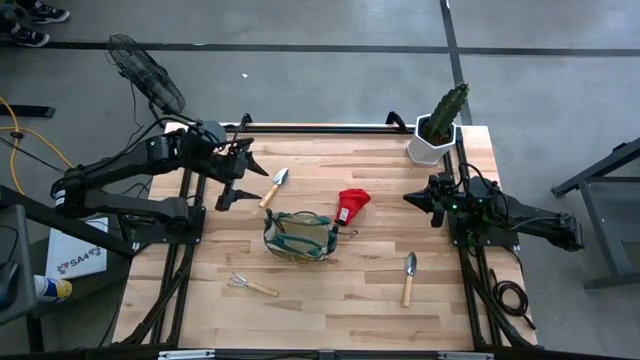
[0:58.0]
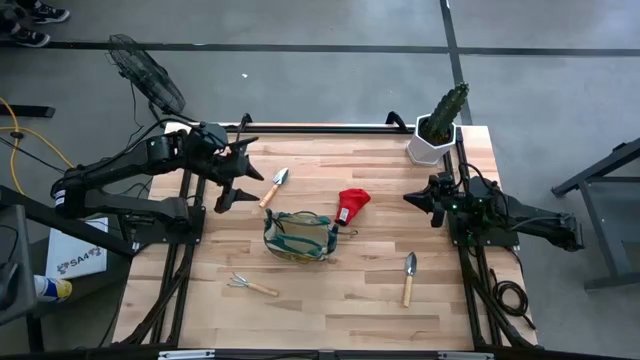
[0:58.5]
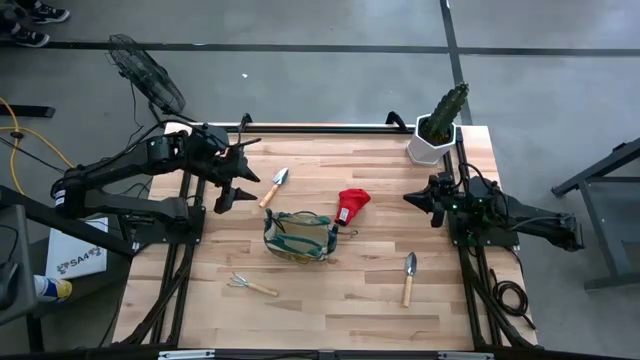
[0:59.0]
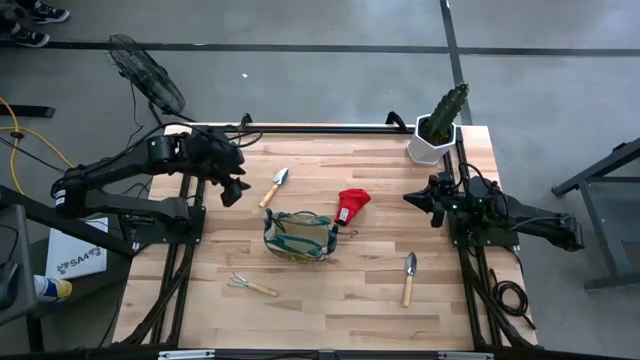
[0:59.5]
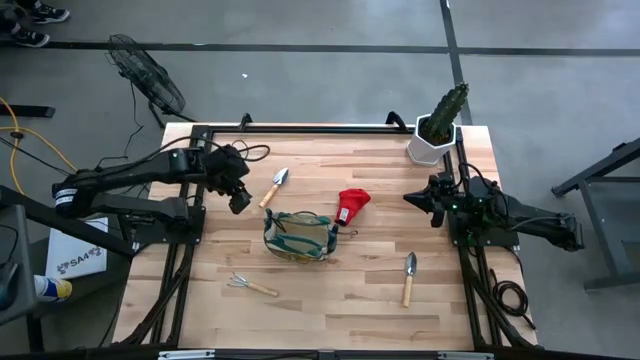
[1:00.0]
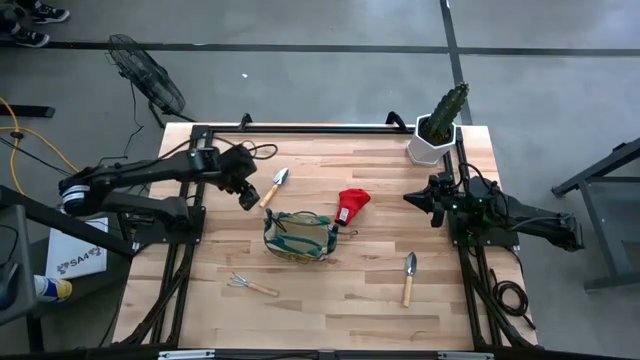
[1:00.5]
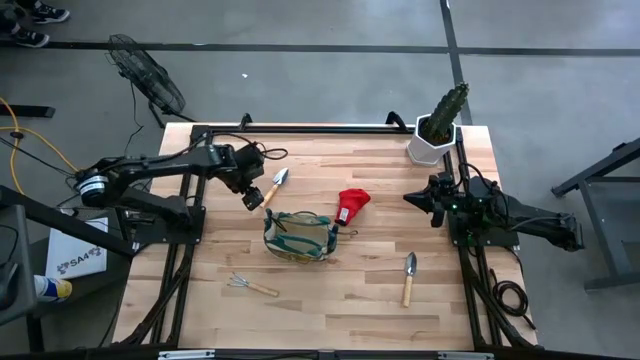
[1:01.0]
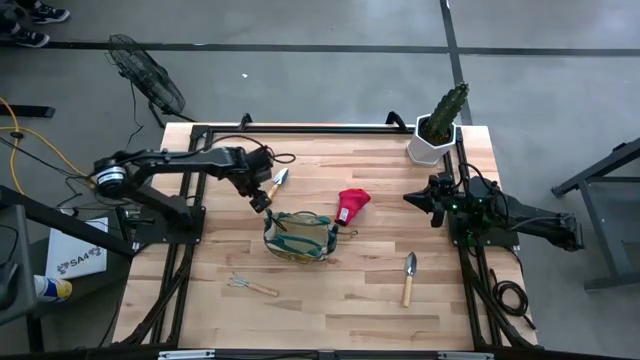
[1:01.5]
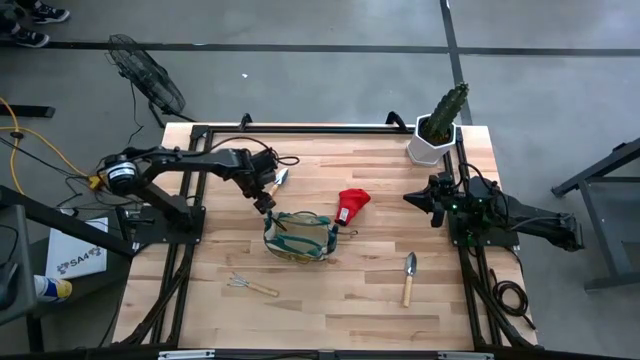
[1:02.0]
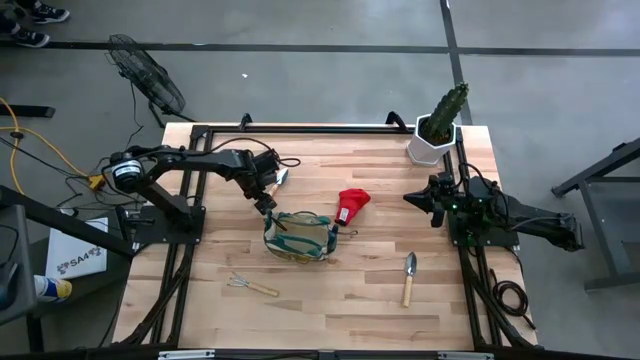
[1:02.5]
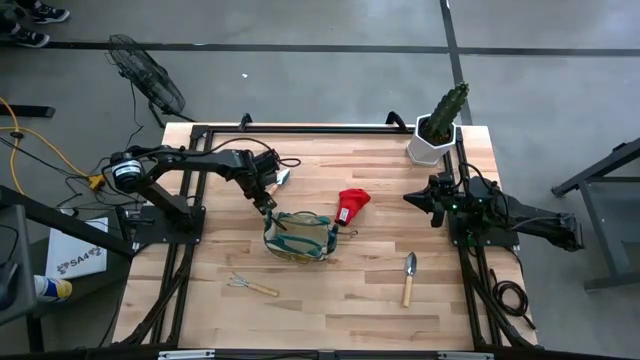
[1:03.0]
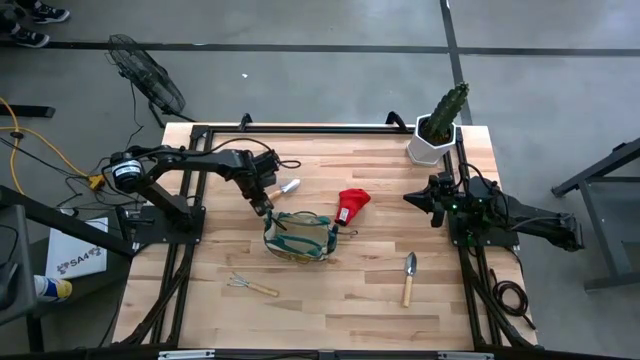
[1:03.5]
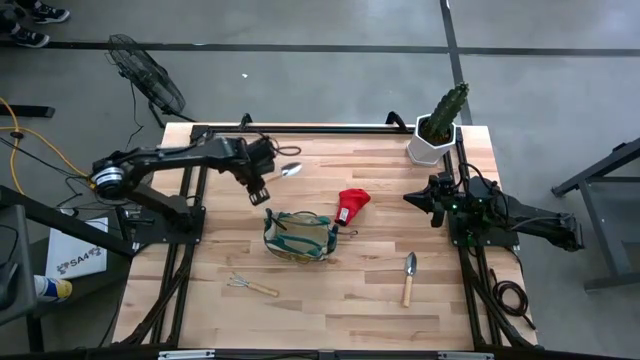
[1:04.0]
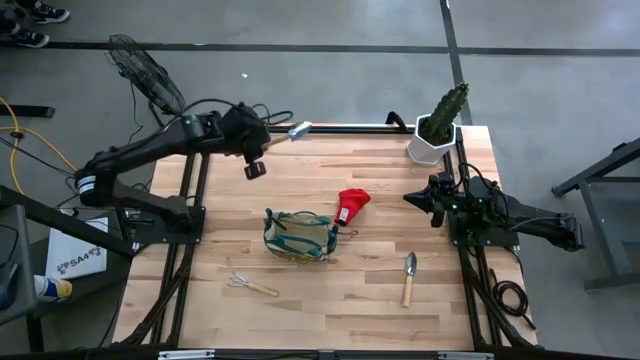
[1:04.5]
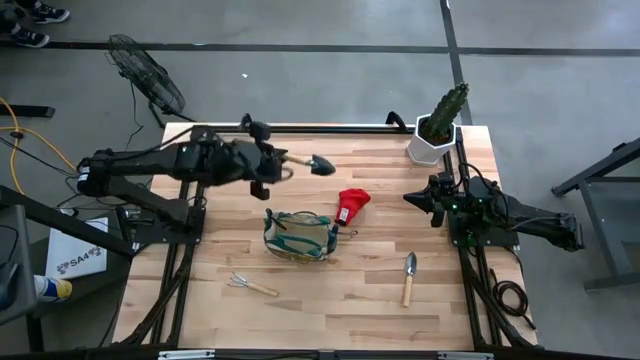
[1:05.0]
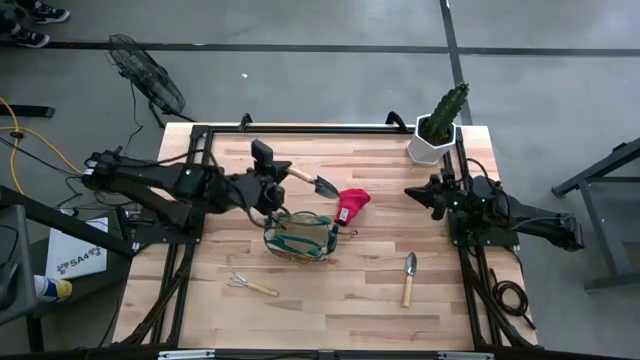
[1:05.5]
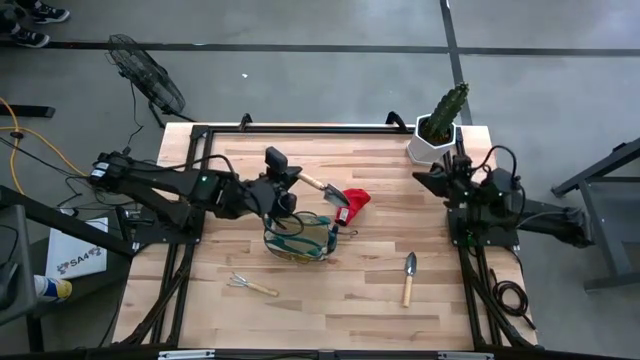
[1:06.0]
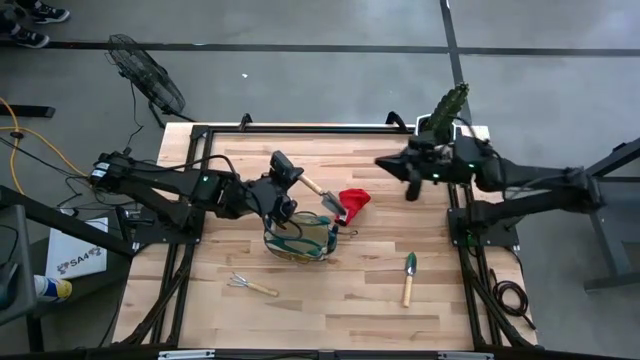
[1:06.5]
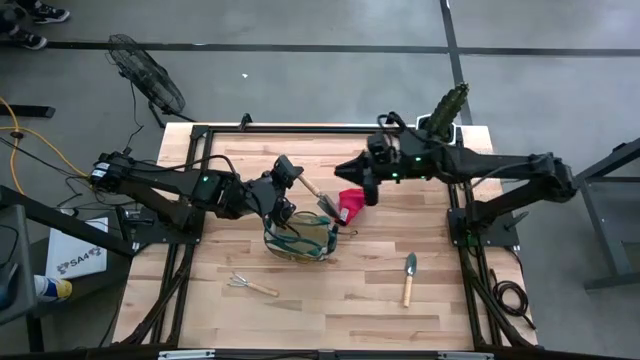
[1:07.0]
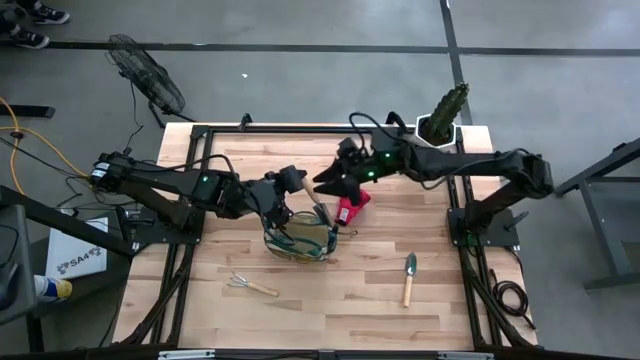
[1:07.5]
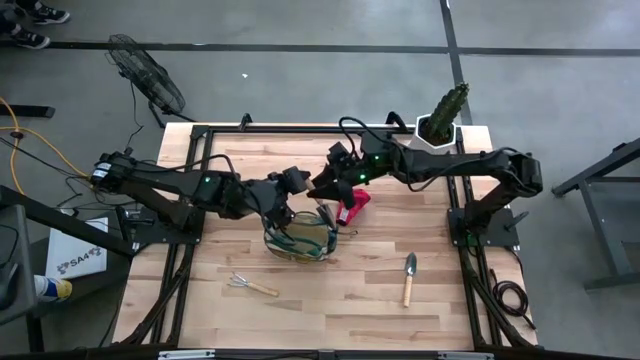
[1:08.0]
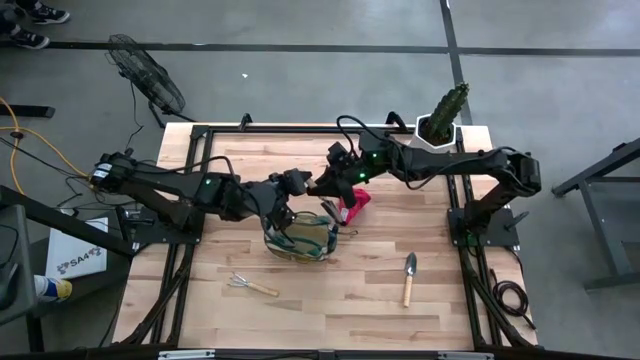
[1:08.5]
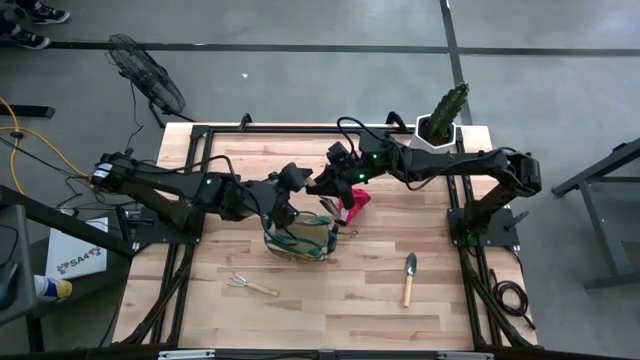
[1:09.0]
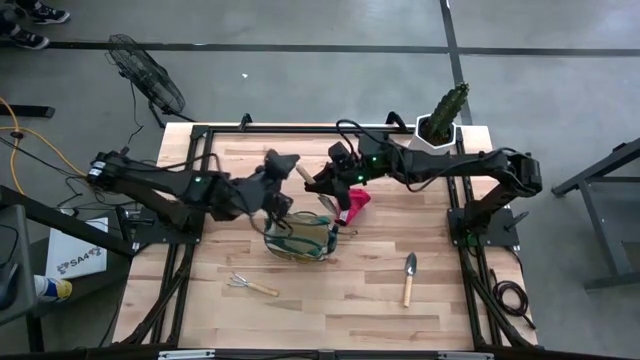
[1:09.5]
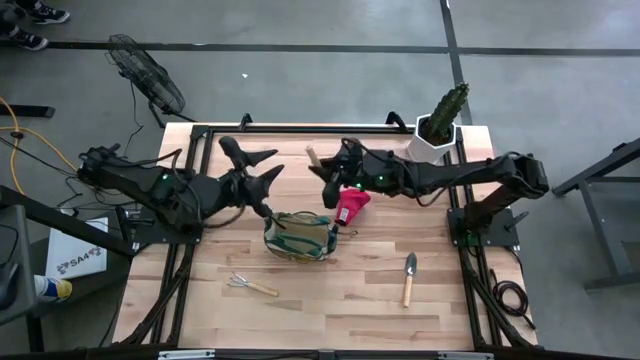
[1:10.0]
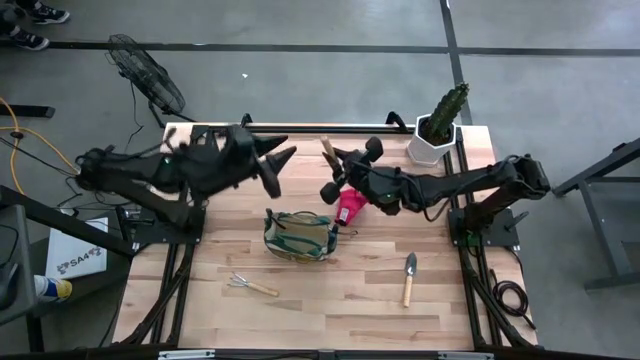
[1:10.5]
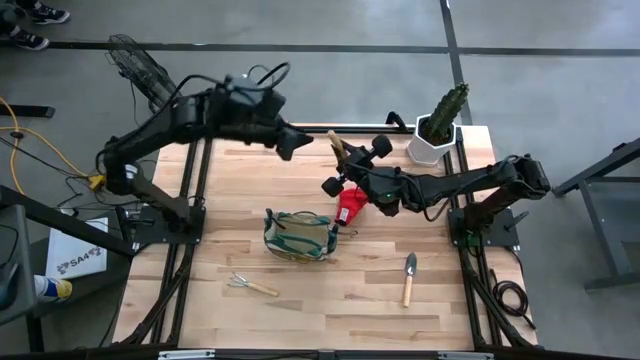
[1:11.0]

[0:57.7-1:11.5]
Task: Pick & Place Garden tools in Gardening bag
Put the left light brown trowel into the gardening bag

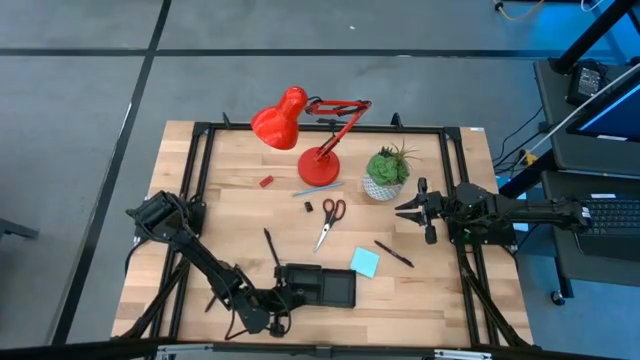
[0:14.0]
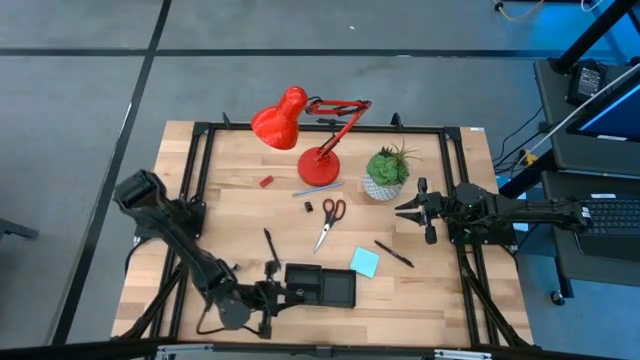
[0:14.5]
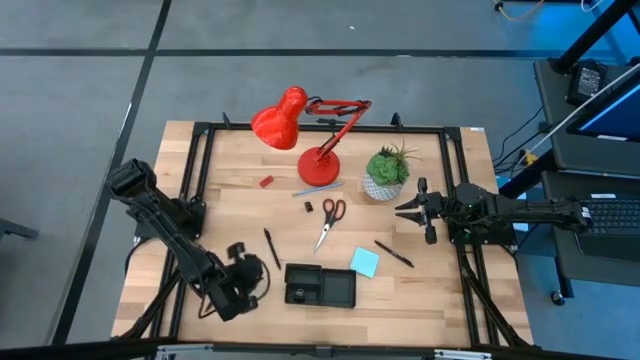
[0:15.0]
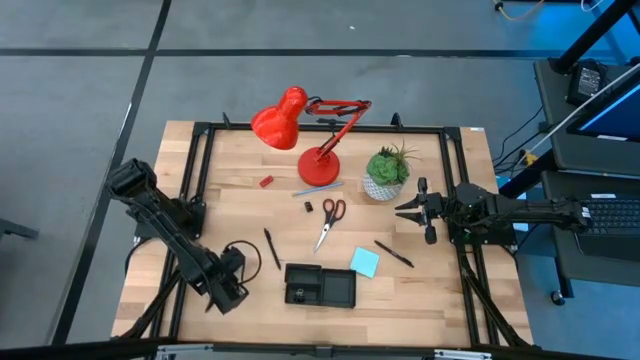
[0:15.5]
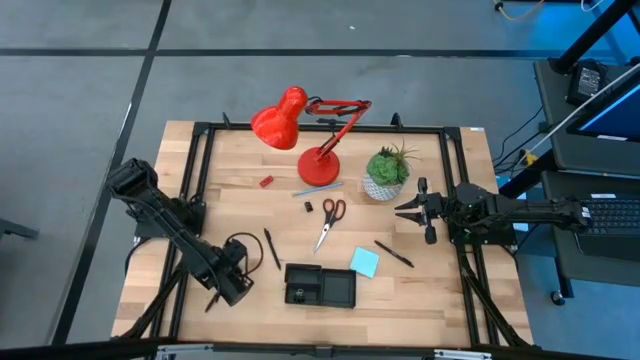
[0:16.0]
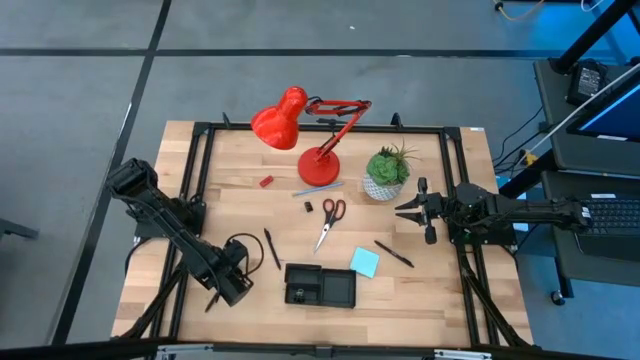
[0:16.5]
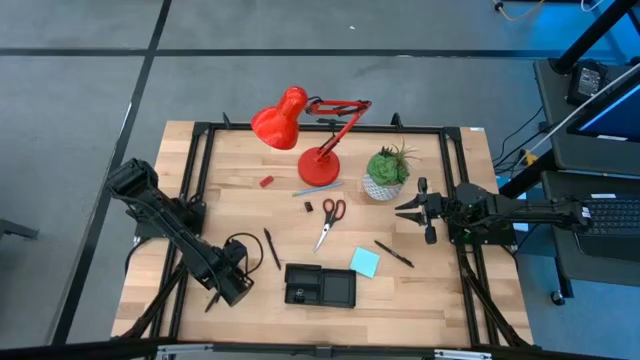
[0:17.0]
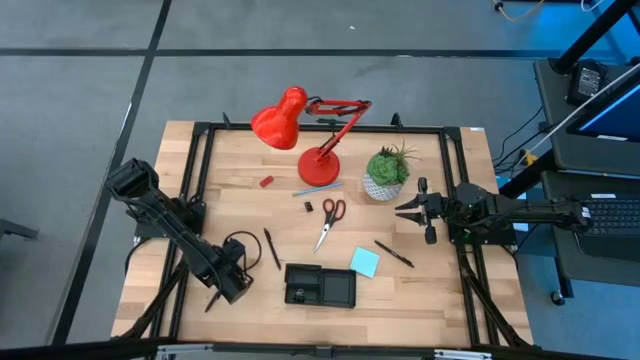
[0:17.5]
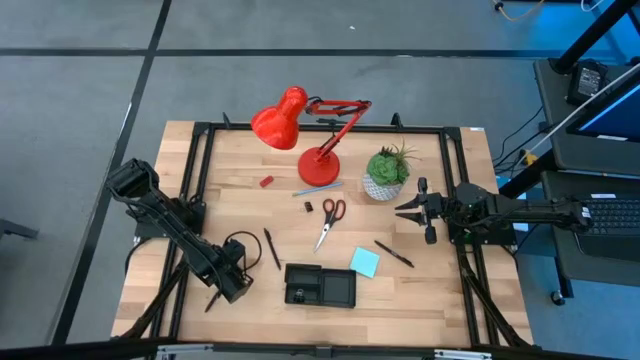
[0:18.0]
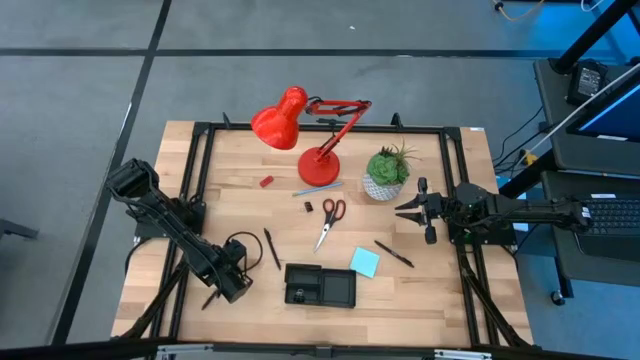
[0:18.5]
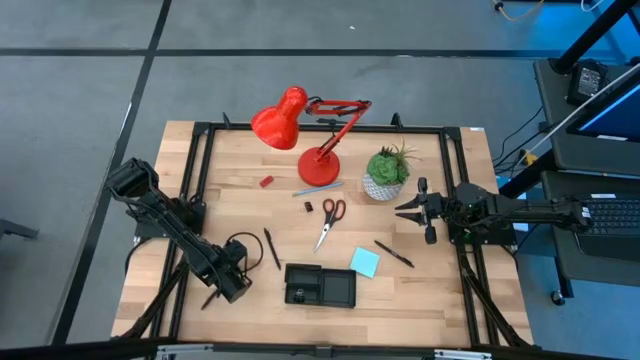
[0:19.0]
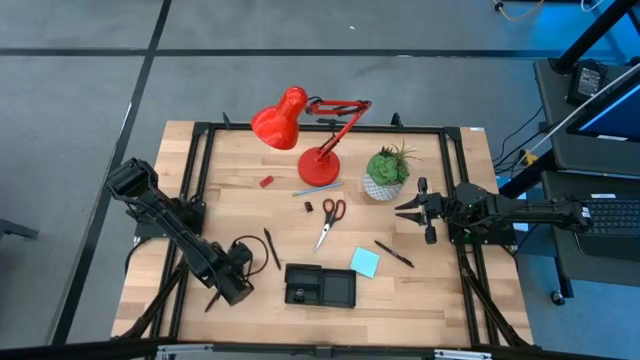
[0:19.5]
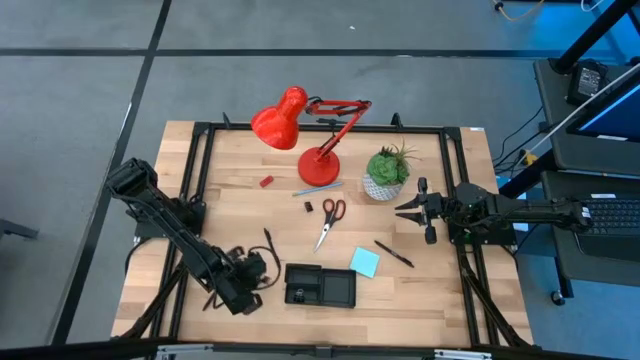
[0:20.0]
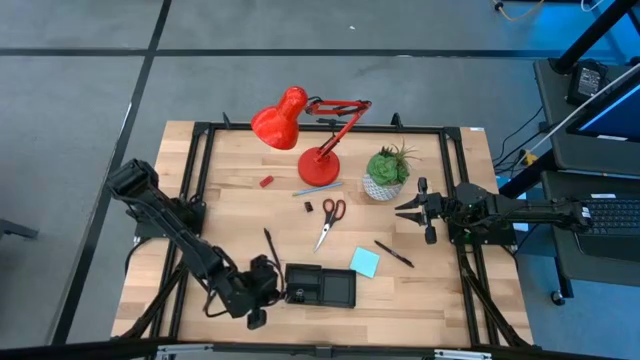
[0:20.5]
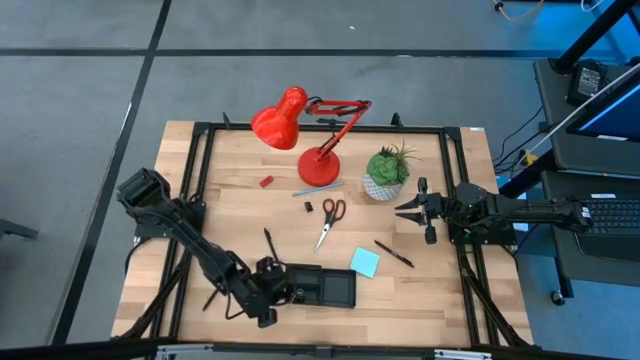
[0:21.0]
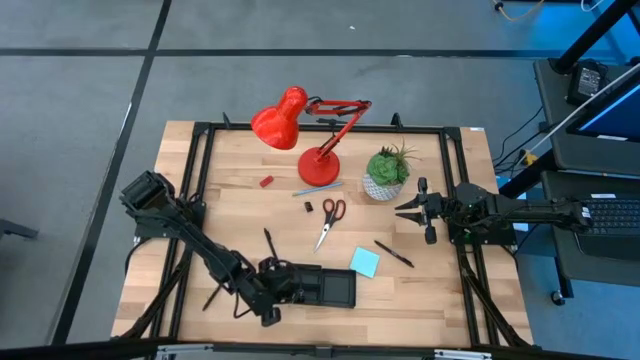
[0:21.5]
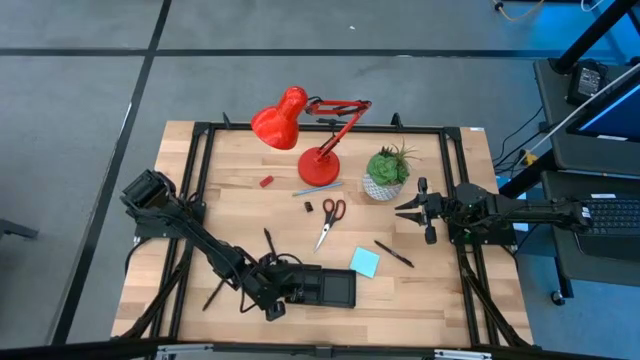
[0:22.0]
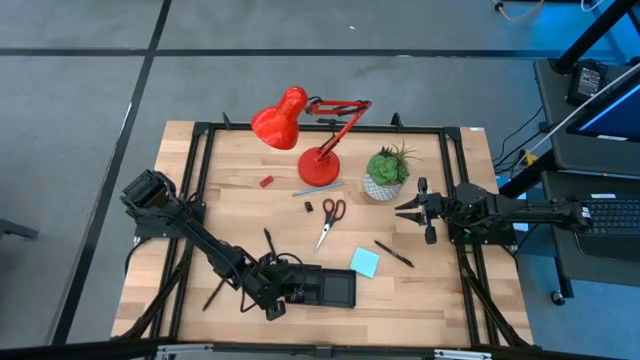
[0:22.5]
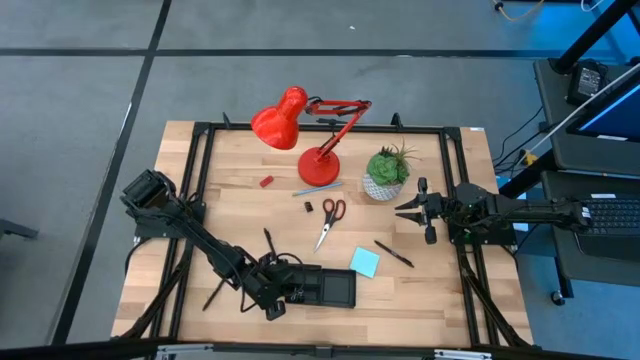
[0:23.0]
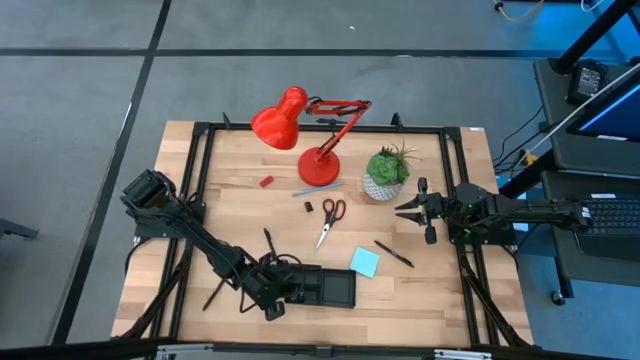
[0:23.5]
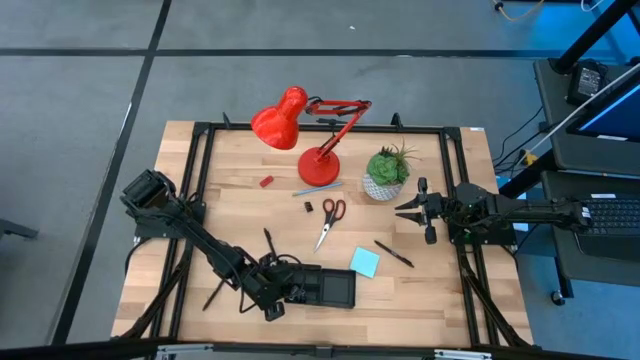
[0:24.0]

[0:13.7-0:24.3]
Task: Pick and place office supplies into organizer
Put the bottom black binder clip into the black desk organizer
